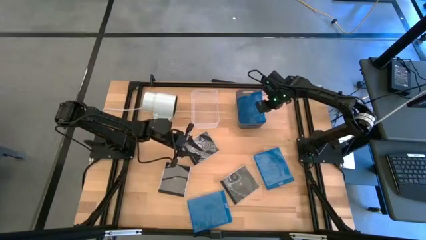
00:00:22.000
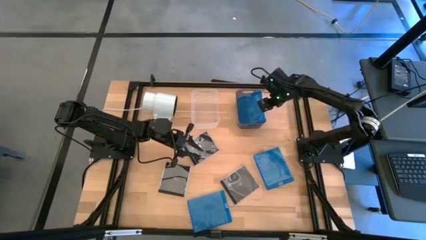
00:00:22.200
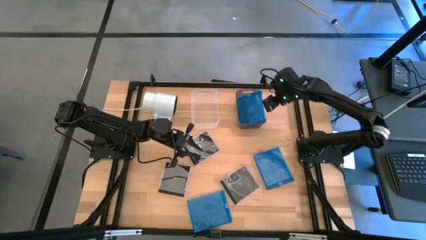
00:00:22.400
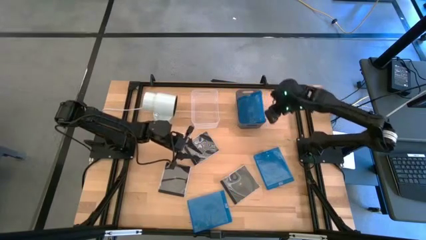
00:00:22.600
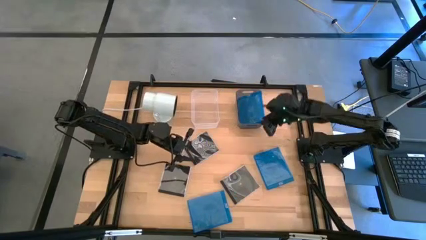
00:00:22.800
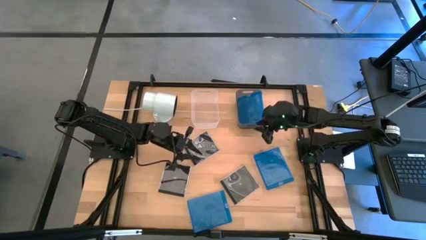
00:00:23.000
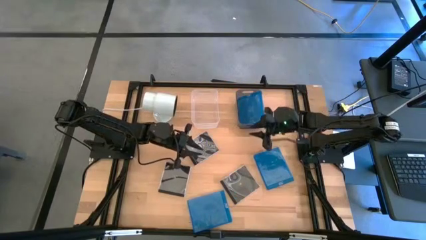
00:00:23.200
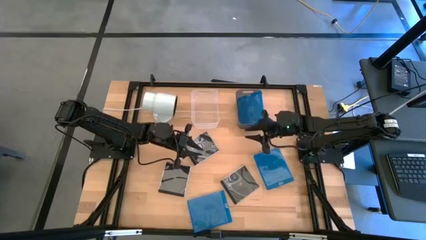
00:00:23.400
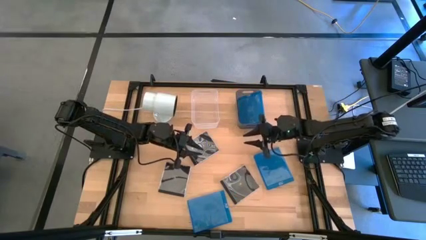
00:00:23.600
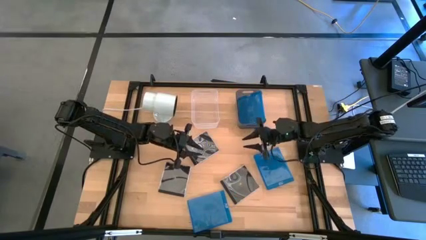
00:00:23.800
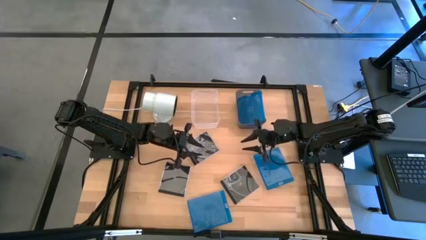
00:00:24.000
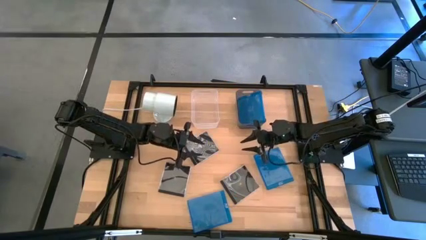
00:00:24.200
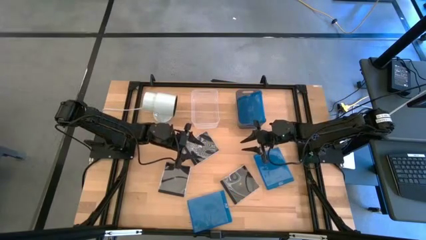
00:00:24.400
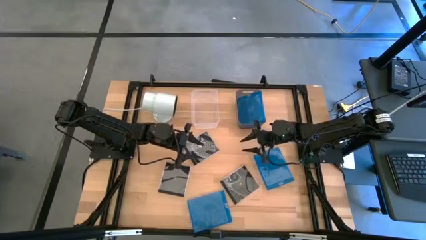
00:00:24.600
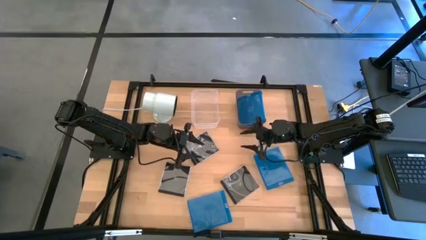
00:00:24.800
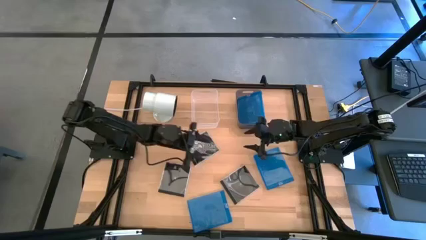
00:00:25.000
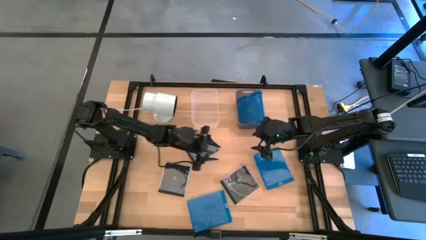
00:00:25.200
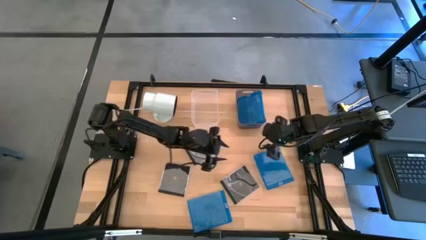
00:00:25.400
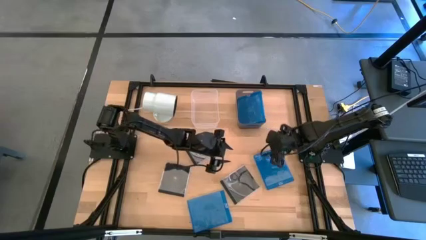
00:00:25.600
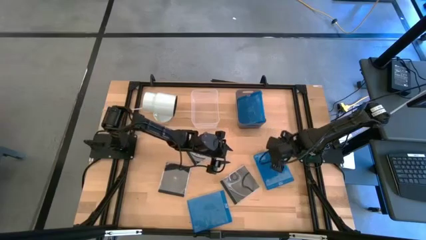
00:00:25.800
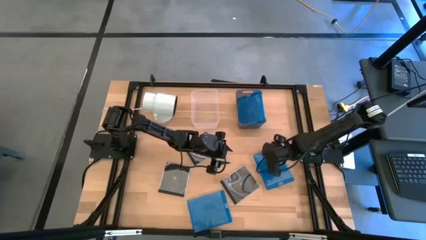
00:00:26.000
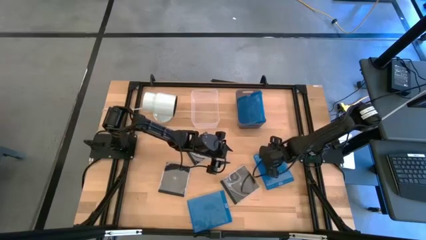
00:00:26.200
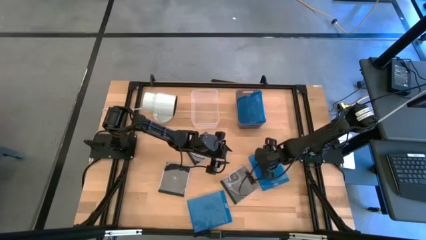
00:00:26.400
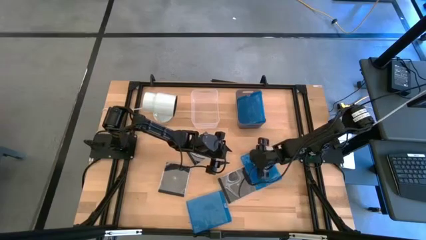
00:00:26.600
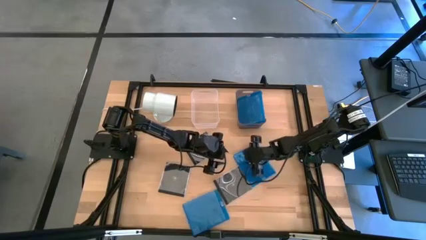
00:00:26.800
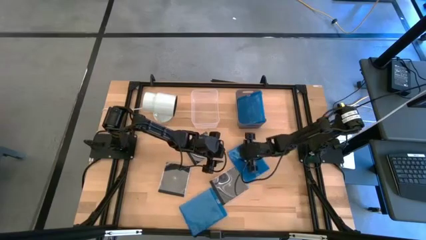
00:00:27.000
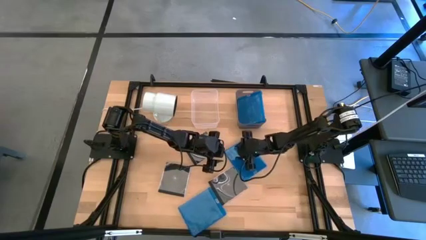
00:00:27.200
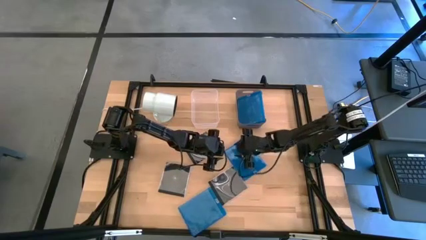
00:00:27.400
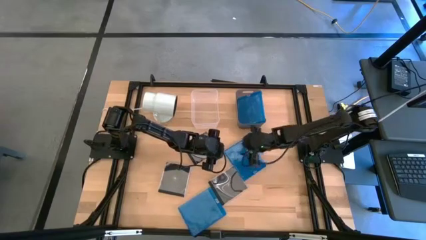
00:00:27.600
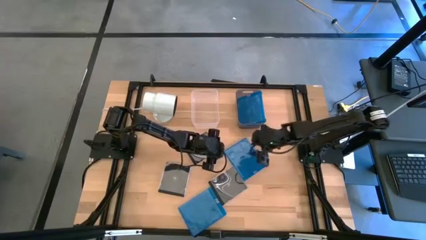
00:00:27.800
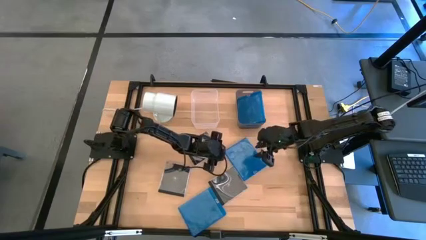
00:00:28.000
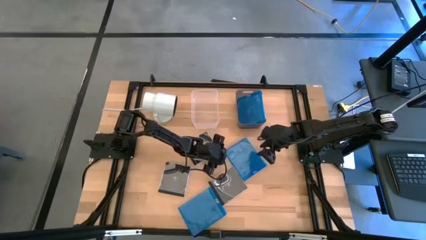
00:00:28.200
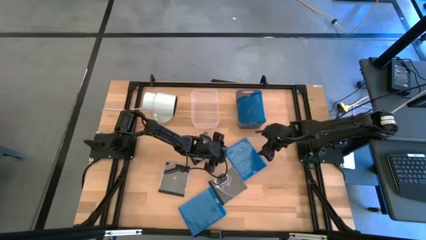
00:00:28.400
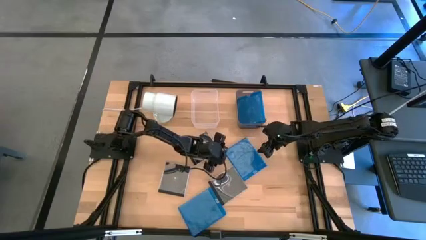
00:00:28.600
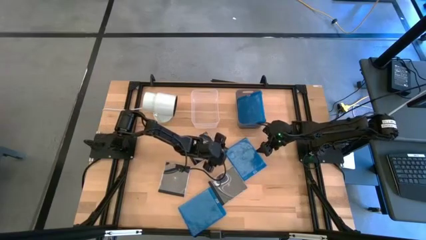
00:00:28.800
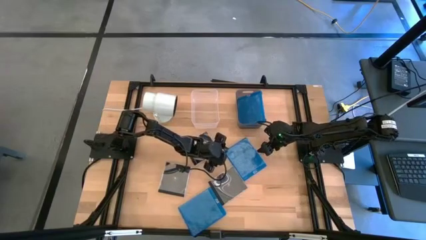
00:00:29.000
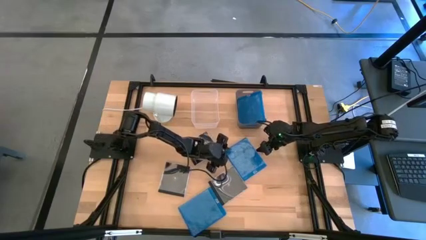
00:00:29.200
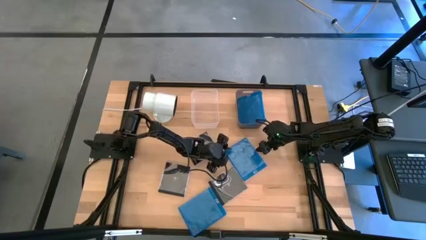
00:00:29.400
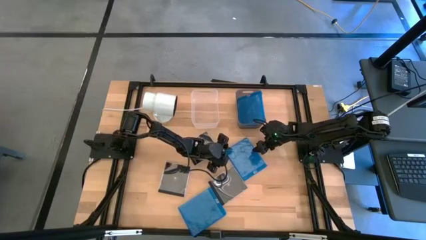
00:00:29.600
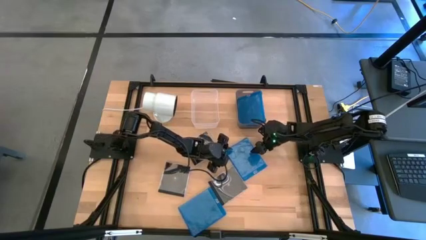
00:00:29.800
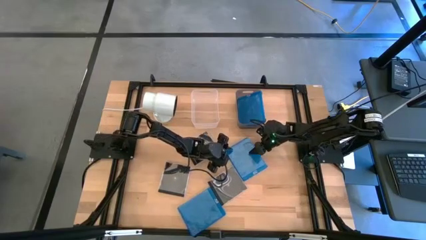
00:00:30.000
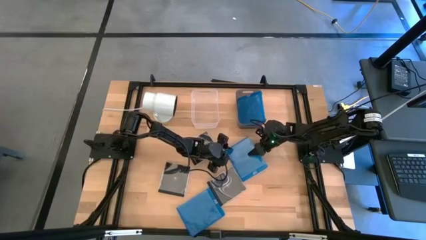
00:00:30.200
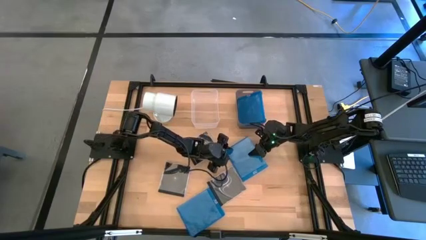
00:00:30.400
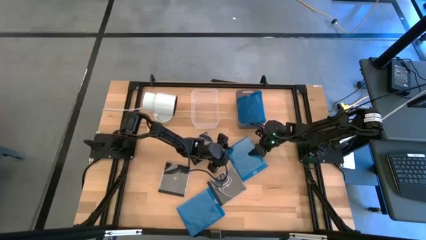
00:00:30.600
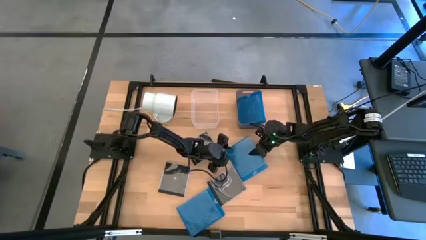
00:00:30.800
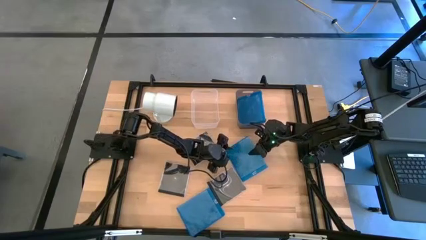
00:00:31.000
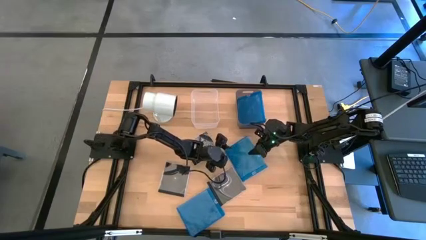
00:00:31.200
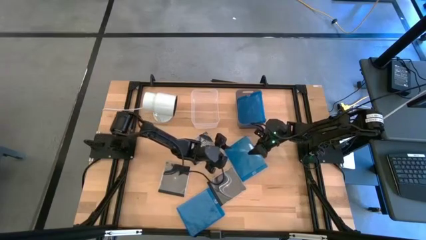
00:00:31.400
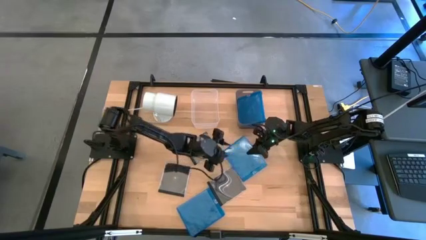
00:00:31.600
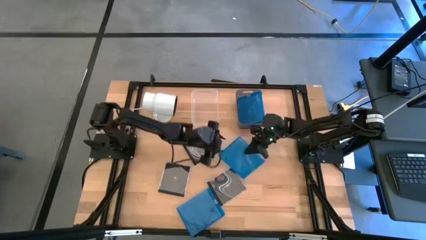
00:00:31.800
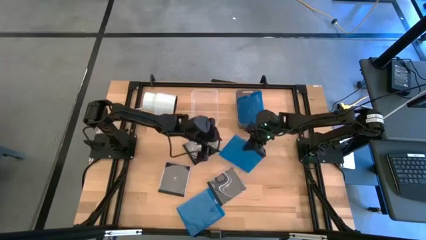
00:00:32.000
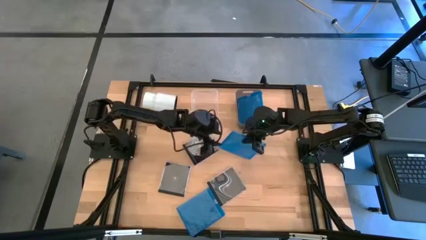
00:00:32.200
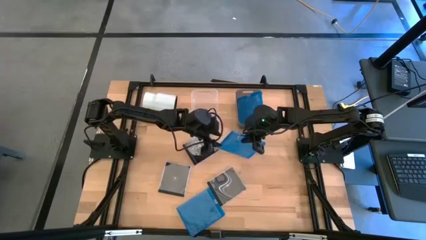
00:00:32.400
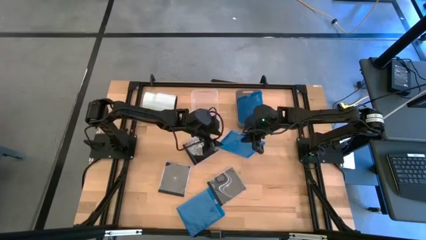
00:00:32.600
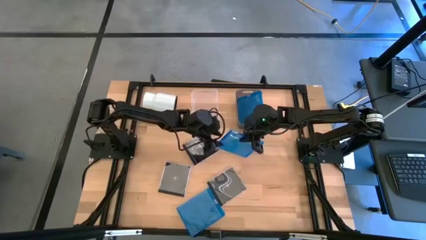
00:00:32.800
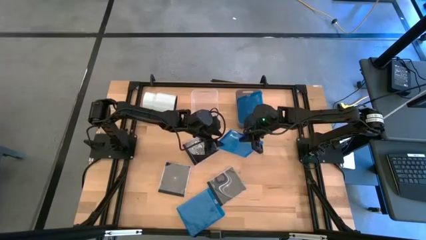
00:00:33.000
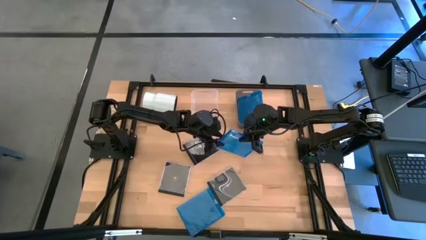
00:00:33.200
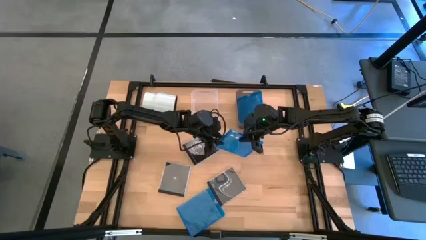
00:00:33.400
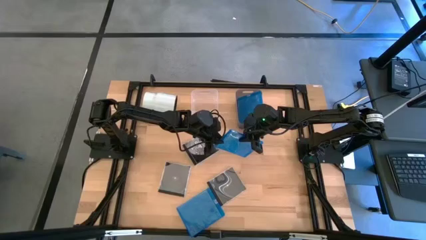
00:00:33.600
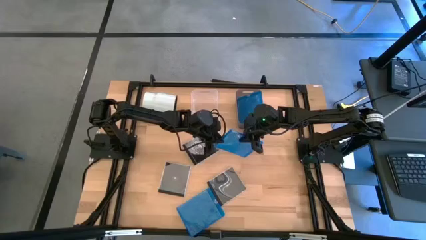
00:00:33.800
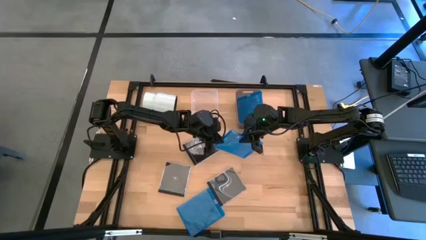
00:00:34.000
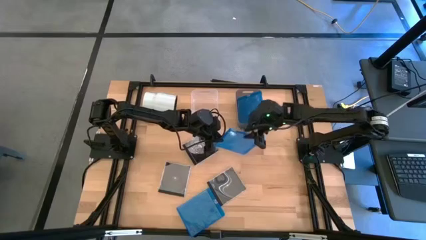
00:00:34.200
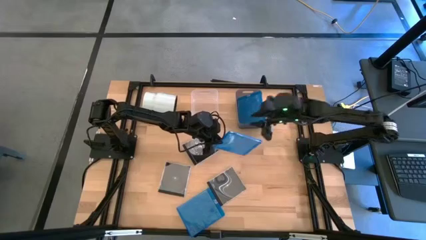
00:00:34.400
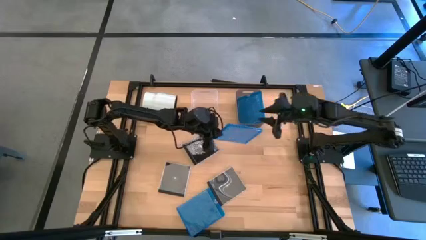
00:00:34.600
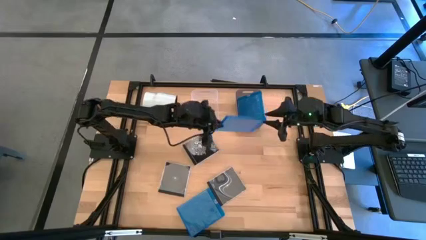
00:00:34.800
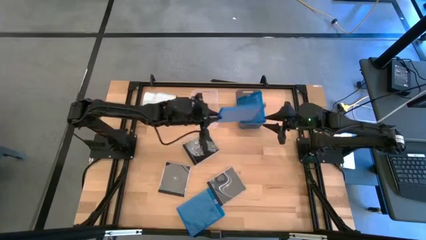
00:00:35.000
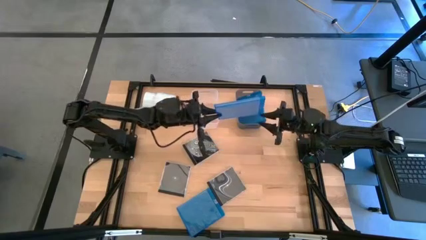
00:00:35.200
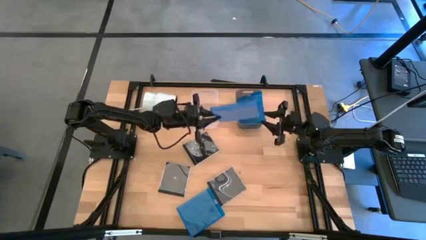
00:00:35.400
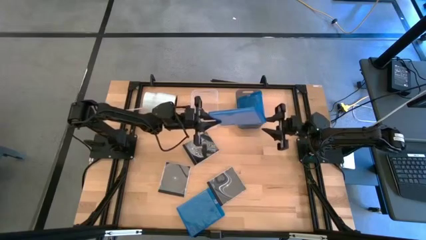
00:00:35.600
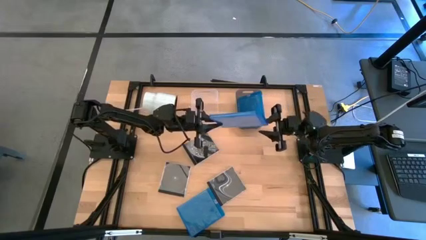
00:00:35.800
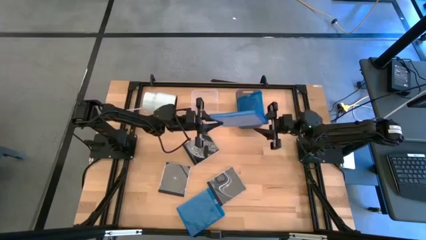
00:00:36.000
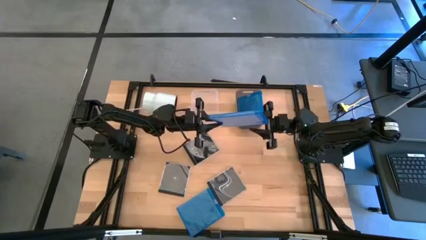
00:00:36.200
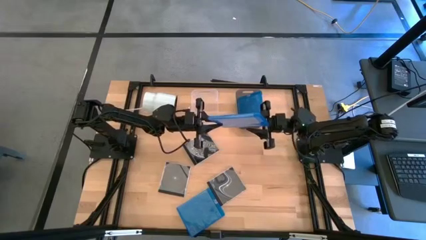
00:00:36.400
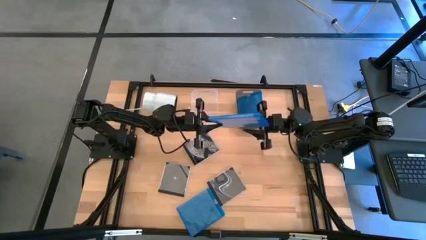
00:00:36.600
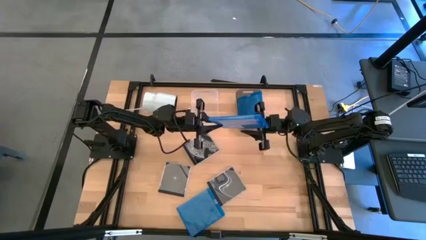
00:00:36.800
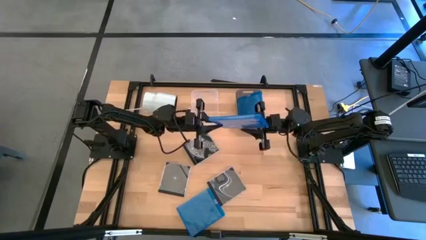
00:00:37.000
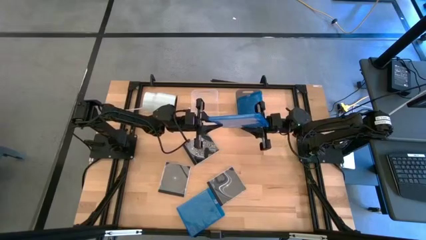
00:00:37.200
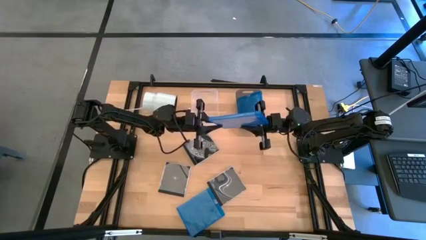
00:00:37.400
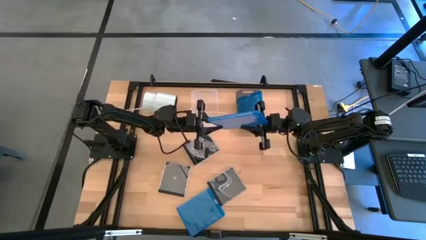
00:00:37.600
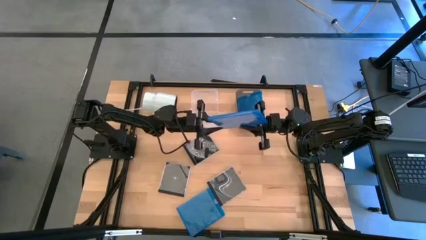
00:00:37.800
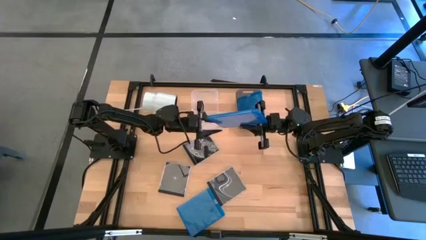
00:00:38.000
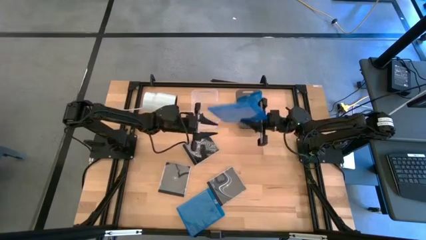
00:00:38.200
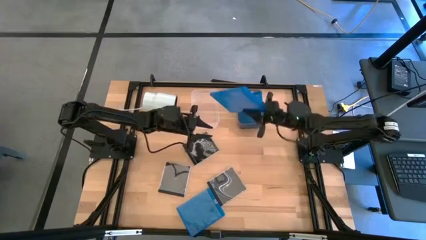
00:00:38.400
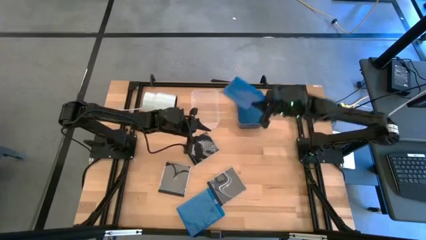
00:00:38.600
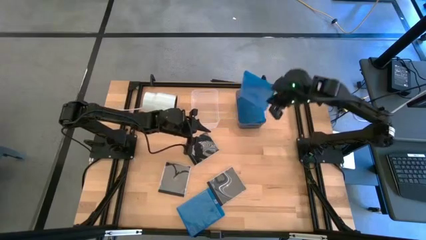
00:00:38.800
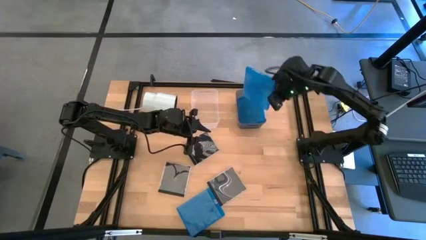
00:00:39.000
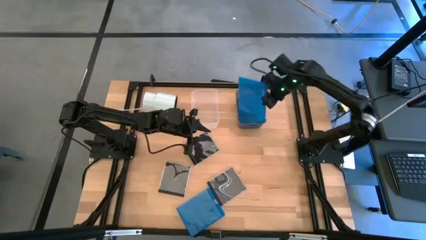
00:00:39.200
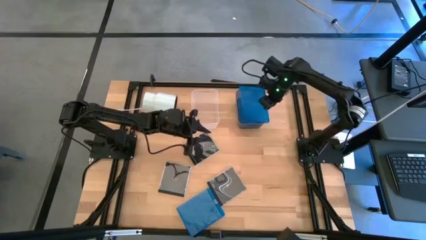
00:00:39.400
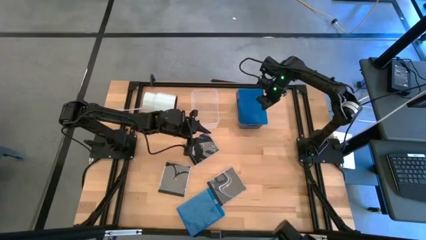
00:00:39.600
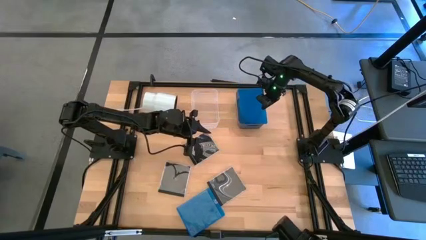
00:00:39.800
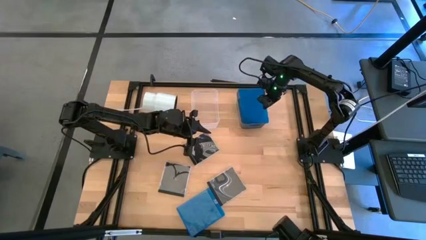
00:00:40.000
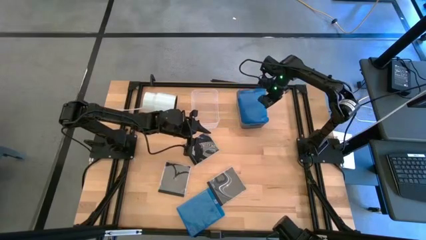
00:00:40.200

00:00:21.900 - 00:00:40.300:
Task: Pick & place jewel cases by type
Put the top blue cd case into the gray bin
